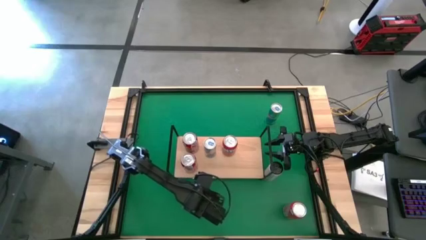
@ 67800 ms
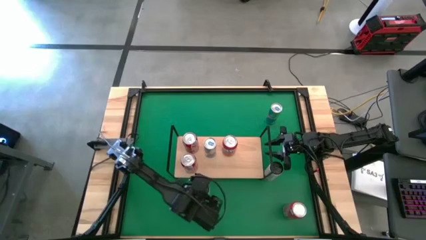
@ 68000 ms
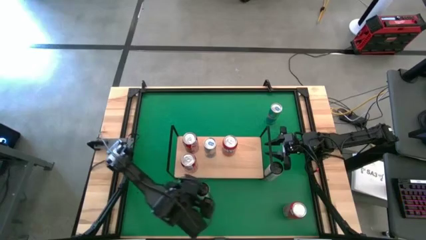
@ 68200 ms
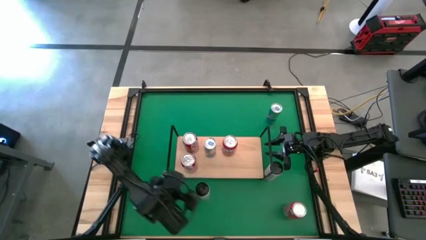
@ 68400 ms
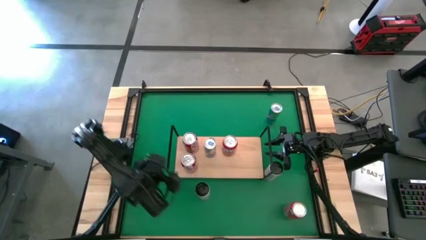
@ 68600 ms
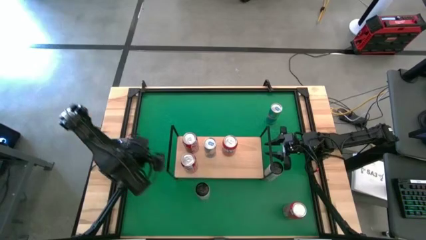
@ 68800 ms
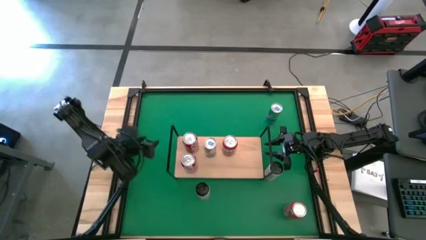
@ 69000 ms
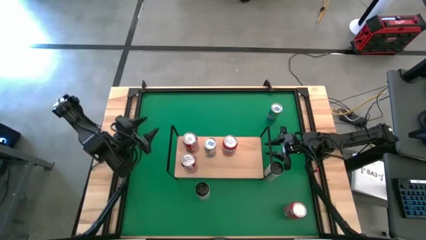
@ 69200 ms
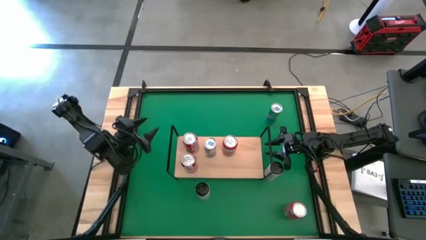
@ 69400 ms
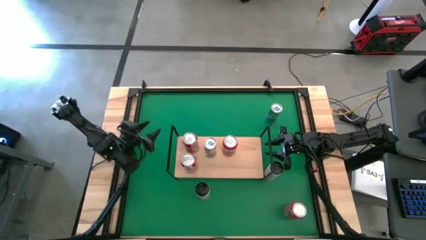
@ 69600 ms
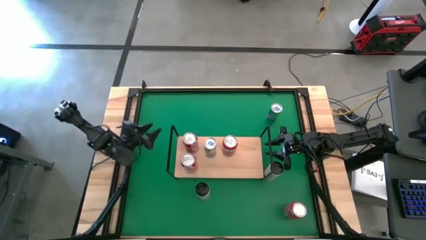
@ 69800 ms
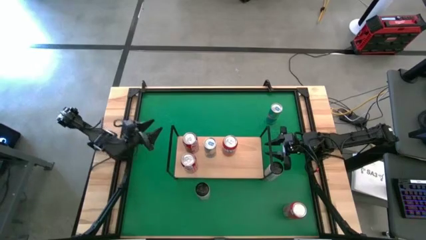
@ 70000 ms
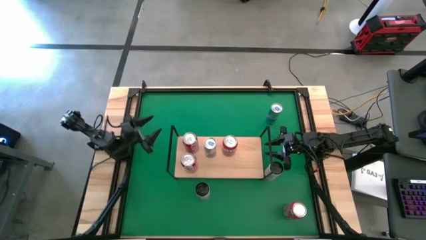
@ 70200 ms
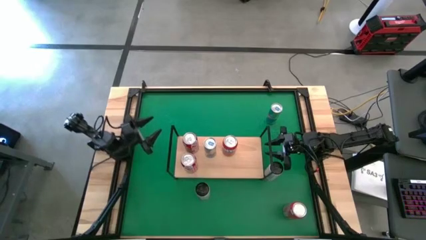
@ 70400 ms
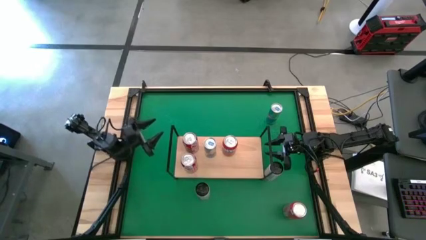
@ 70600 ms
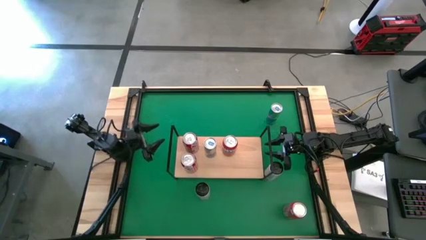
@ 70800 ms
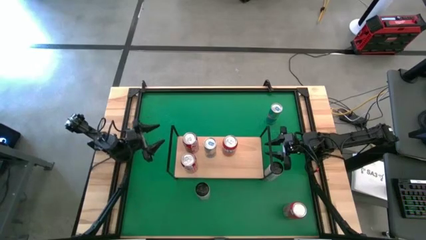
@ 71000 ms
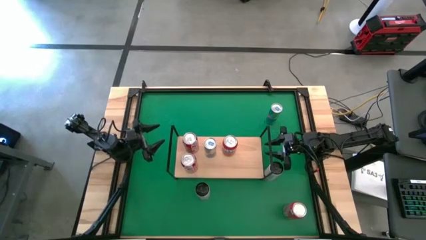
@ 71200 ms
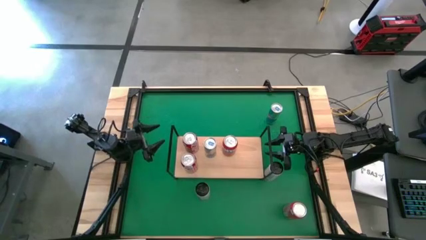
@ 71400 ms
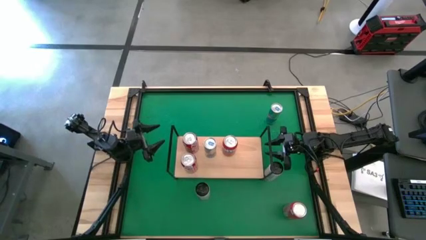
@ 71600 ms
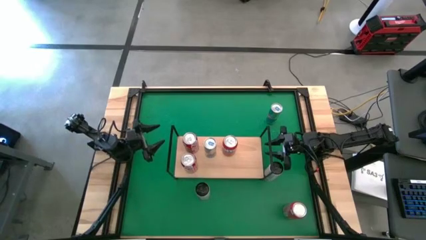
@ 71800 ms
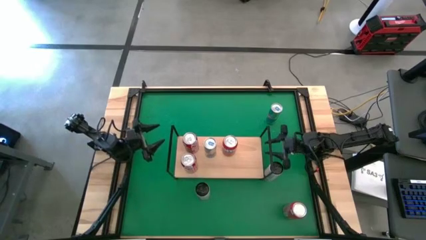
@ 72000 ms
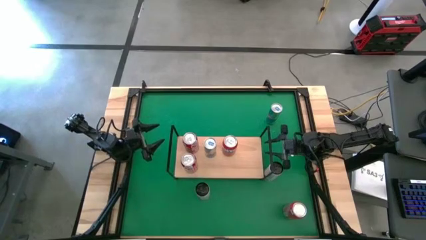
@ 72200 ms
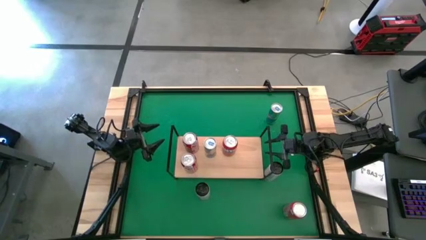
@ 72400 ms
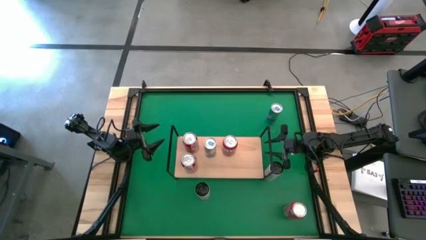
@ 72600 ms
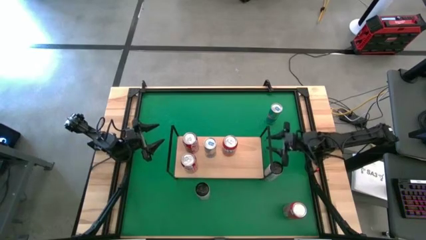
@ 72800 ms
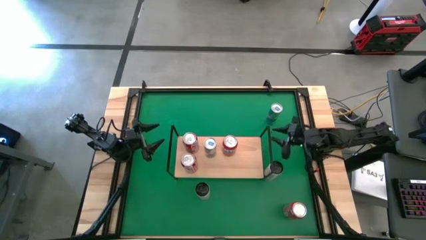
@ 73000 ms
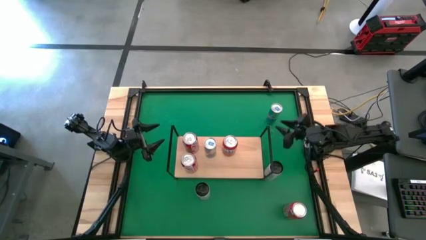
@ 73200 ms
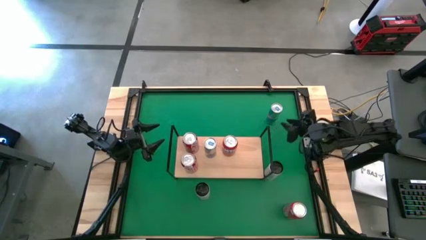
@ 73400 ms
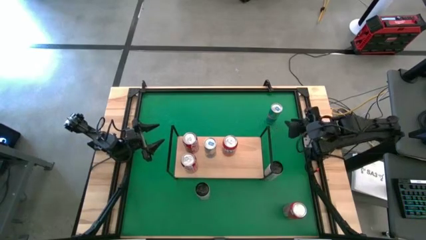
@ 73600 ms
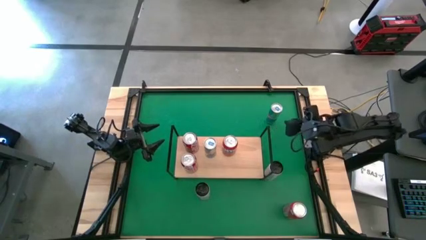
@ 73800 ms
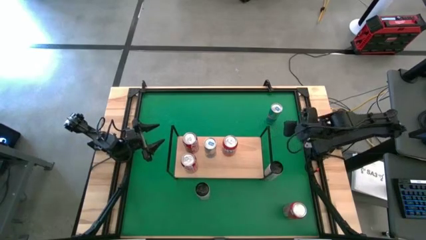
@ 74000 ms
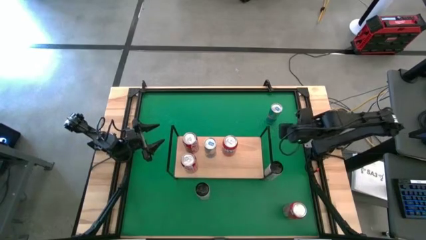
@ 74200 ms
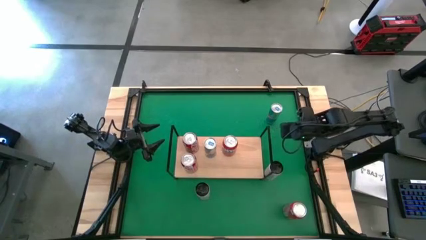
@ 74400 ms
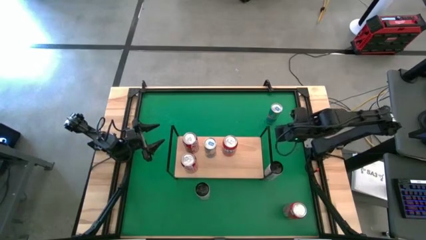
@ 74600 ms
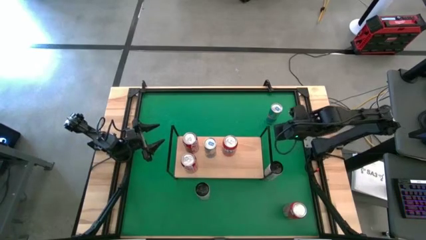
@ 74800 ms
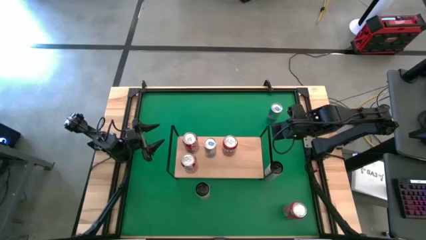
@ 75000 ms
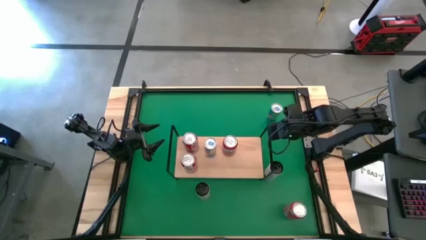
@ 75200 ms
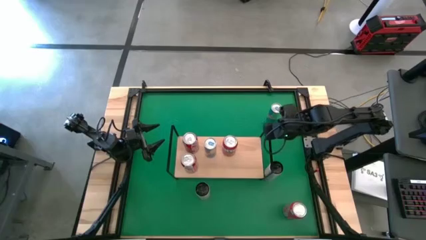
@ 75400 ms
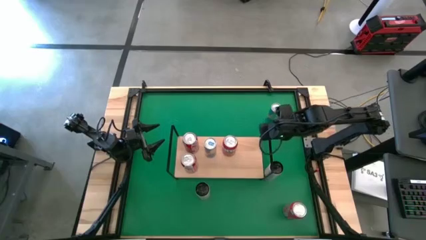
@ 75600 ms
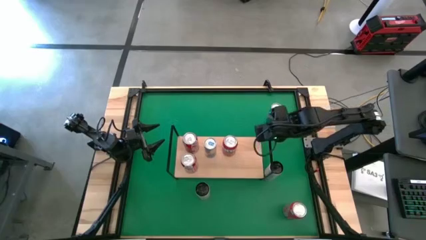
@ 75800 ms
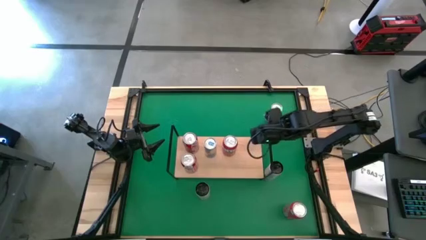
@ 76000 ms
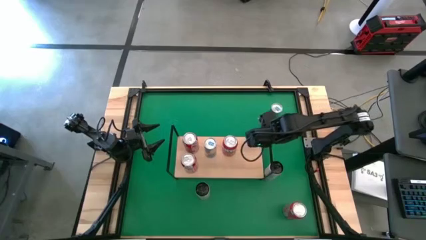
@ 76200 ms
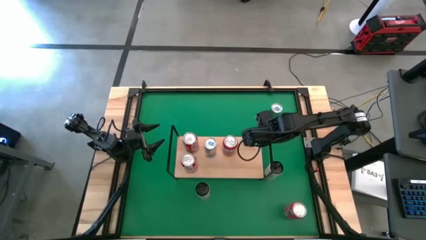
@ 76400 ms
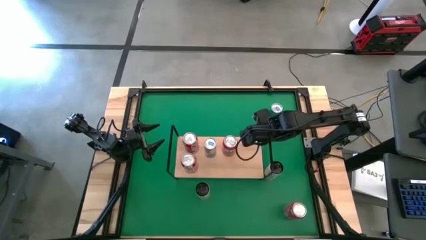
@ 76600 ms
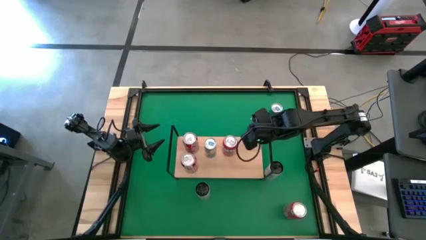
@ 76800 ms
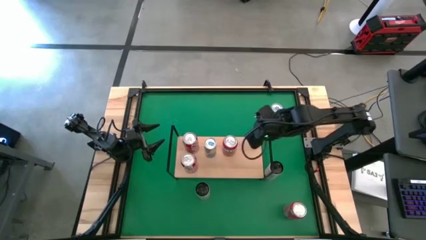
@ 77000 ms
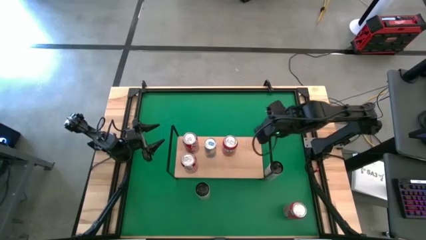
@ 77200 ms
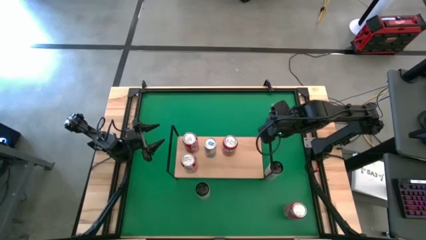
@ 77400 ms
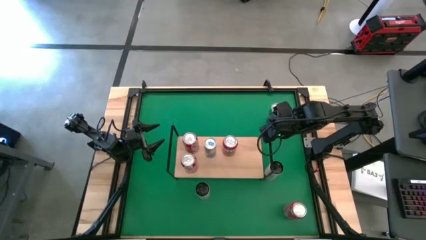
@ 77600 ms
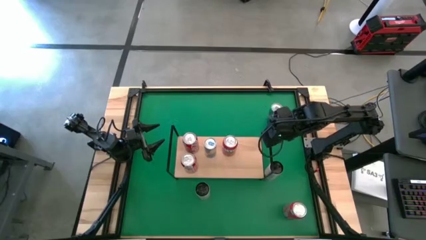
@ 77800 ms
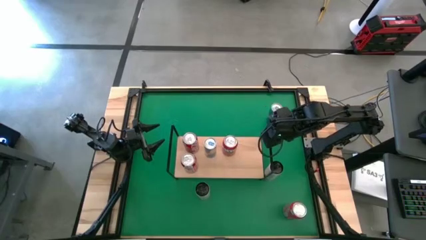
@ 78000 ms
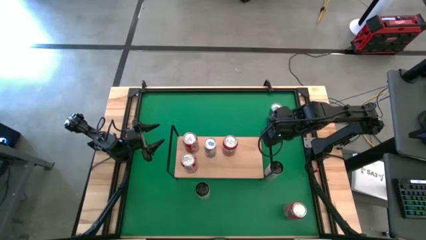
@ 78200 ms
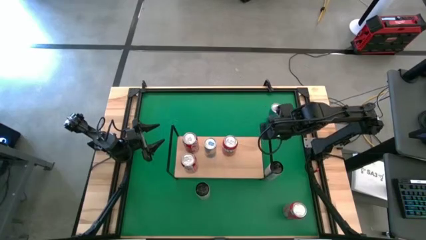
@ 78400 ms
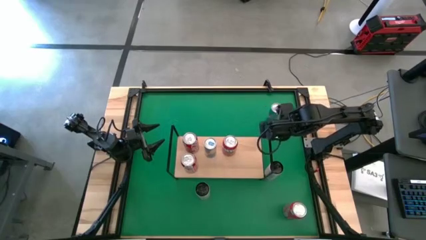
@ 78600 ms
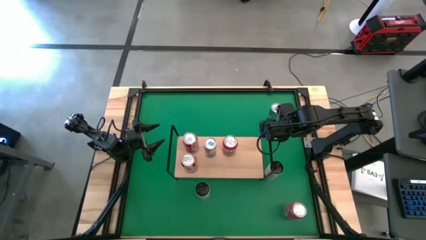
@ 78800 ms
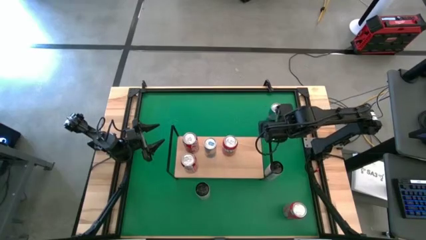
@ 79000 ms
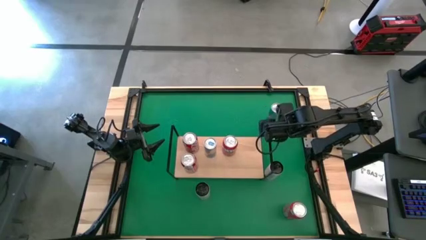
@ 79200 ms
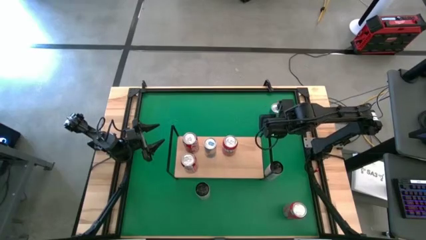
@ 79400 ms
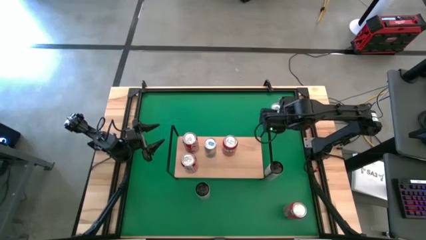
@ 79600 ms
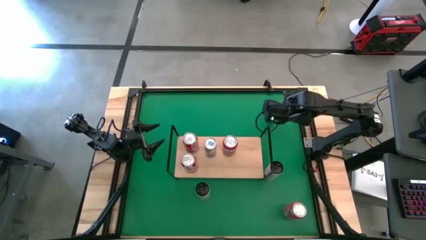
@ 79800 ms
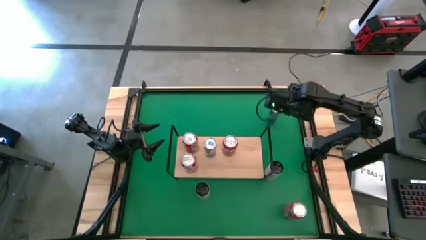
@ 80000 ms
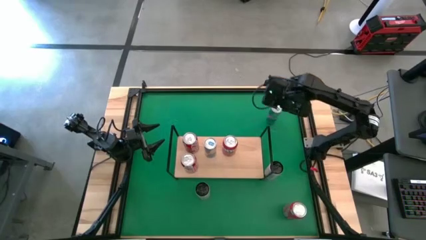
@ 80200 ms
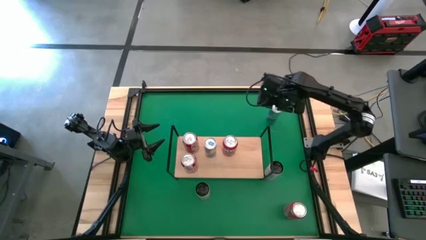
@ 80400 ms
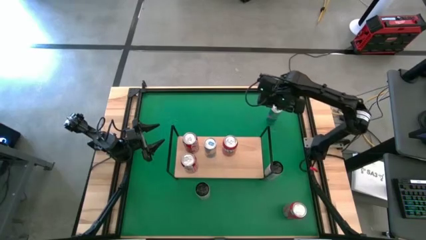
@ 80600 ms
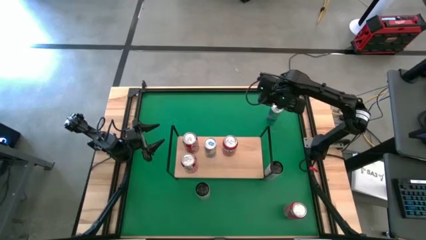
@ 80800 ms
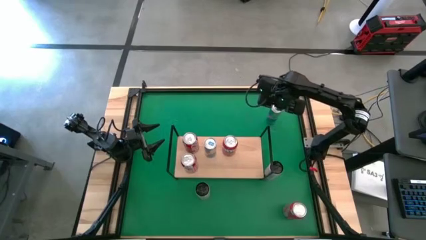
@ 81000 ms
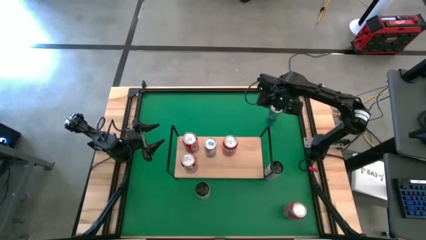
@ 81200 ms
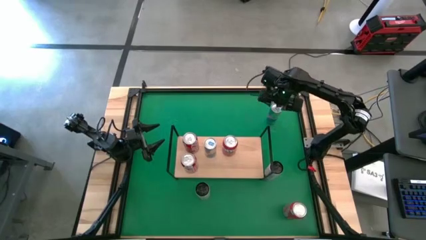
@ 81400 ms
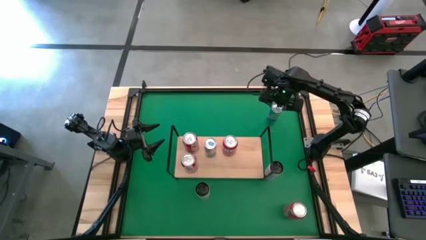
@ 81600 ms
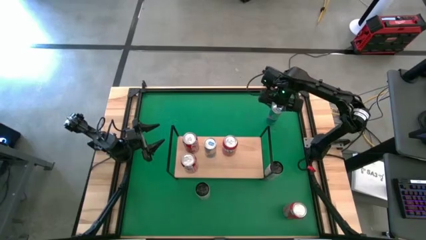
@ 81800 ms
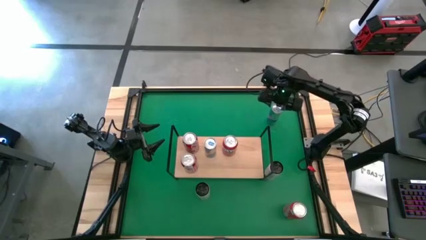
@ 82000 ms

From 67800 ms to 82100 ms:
Task: Place canned beverage on shelf
Put the blue soda can on the shelf

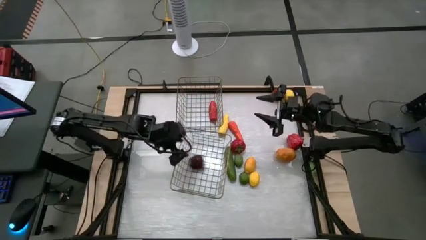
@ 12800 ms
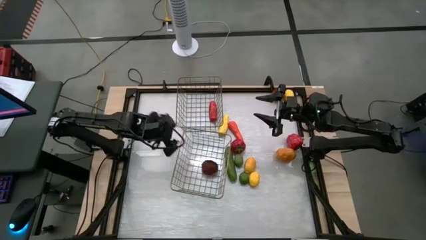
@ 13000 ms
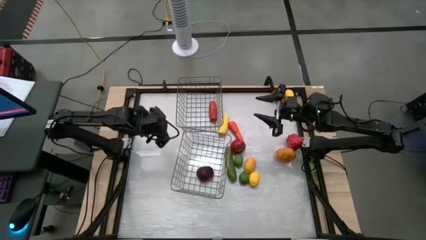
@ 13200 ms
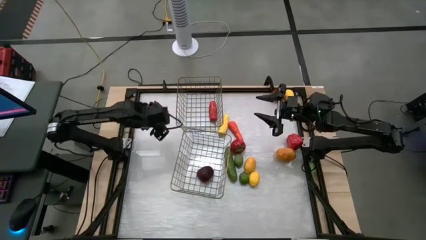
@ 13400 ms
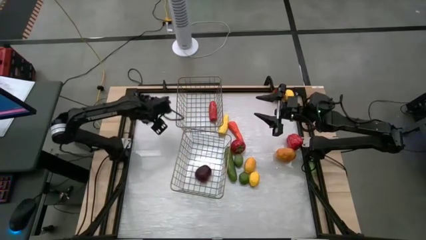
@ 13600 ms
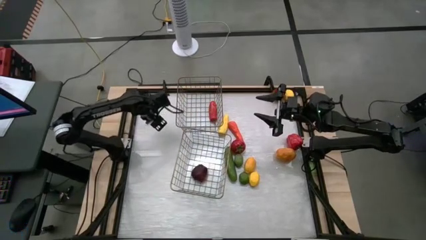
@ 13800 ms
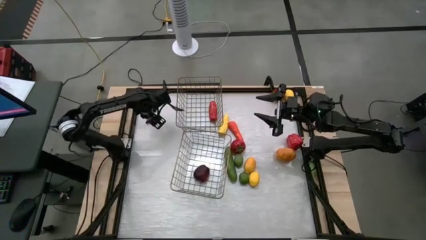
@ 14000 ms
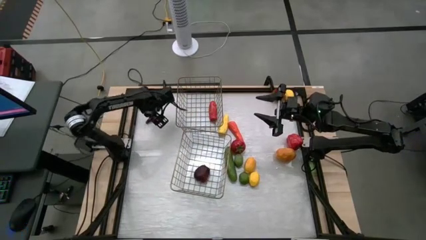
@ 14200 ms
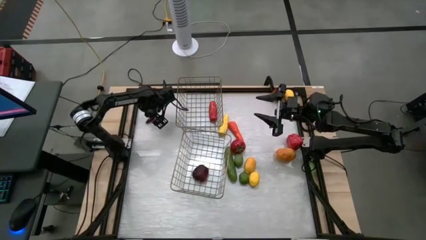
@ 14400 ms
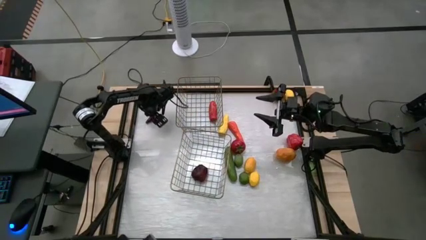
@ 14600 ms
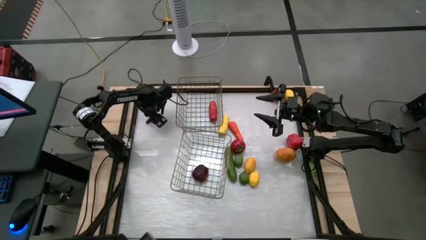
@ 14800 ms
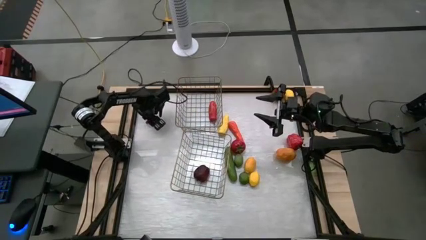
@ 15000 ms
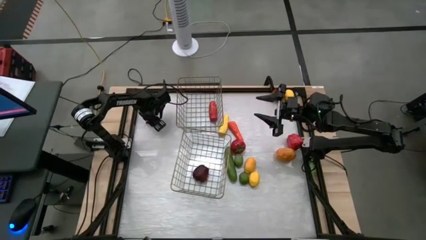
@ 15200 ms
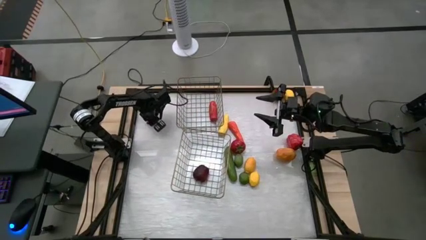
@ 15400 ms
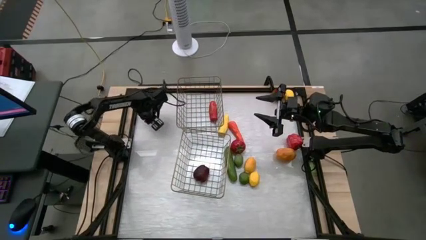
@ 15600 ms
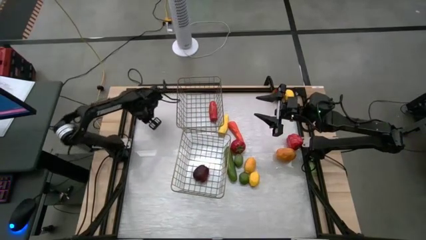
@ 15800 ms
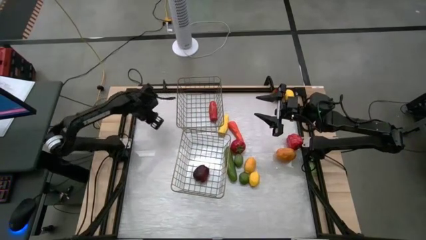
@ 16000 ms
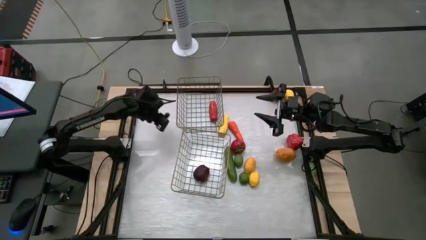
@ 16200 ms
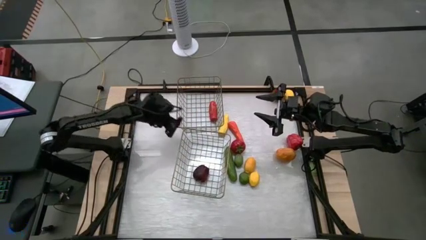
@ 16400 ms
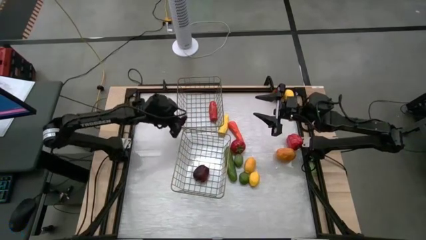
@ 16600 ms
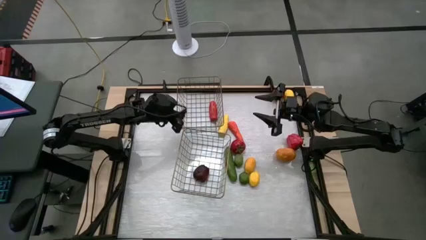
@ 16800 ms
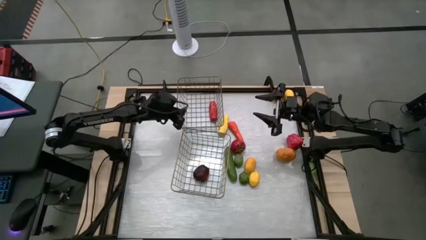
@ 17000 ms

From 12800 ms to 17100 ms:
Task: Sort produce into baskets
Put the violet avocado into the top basket
